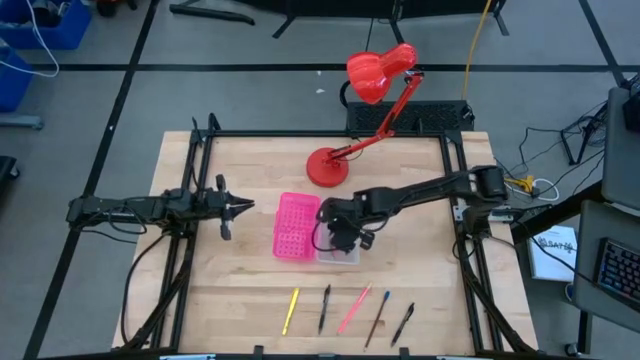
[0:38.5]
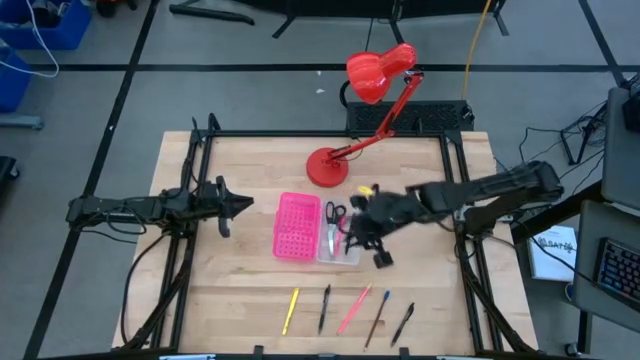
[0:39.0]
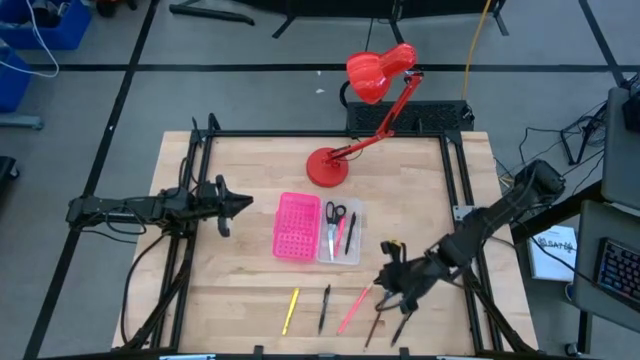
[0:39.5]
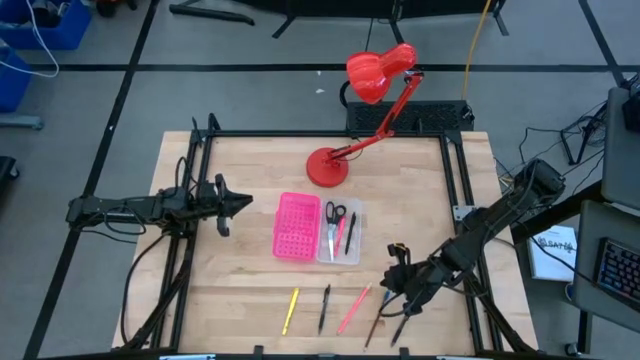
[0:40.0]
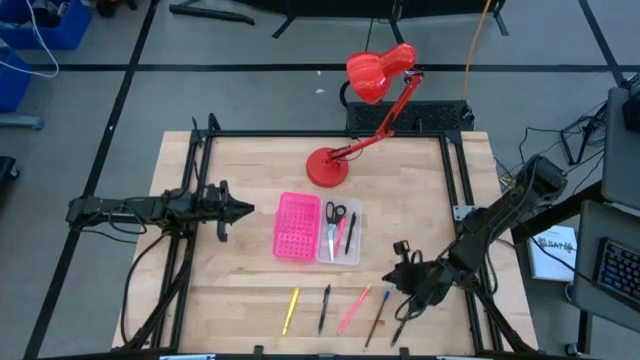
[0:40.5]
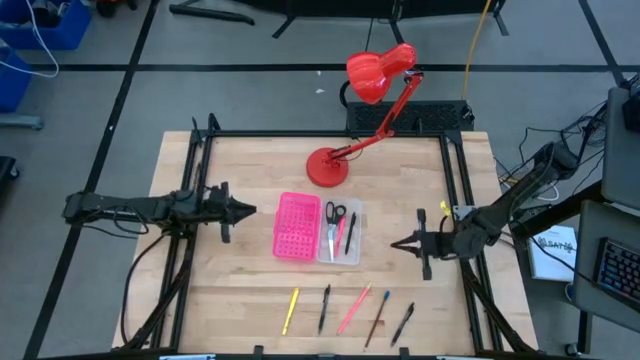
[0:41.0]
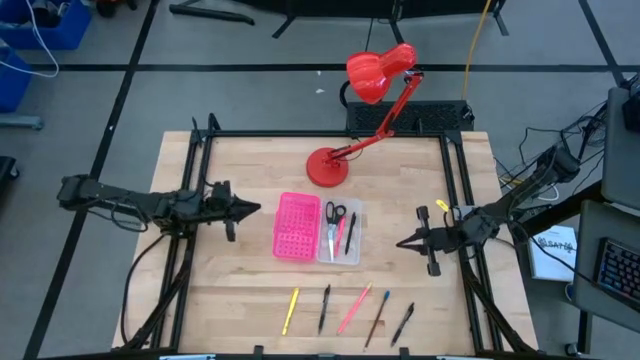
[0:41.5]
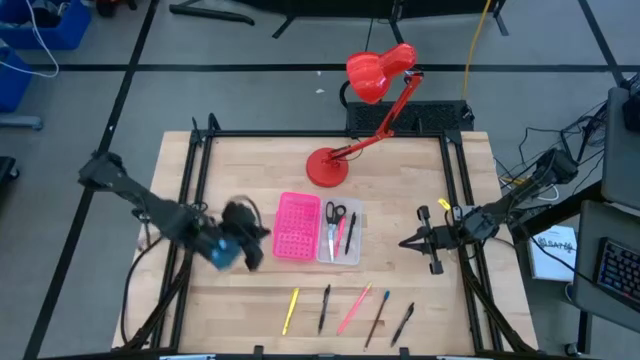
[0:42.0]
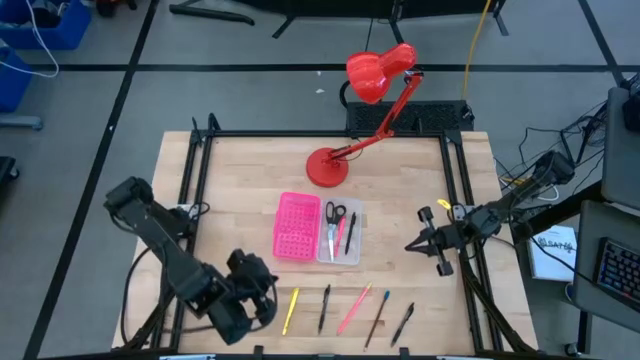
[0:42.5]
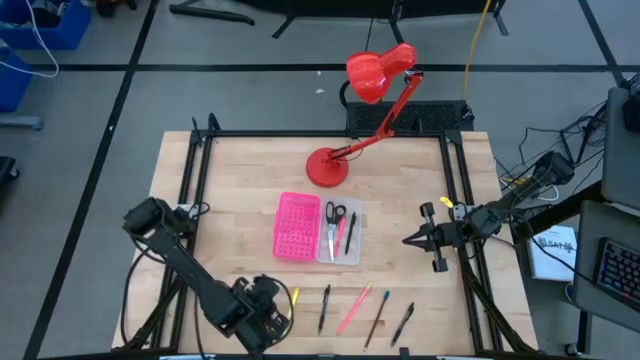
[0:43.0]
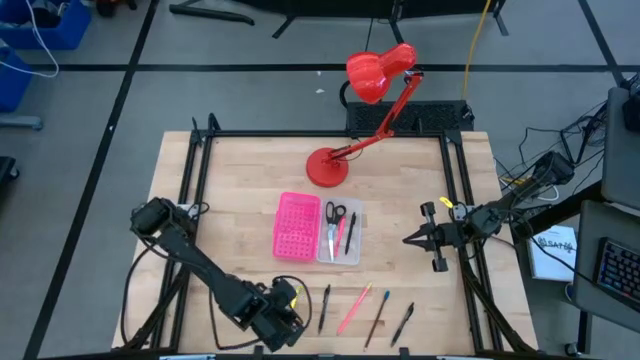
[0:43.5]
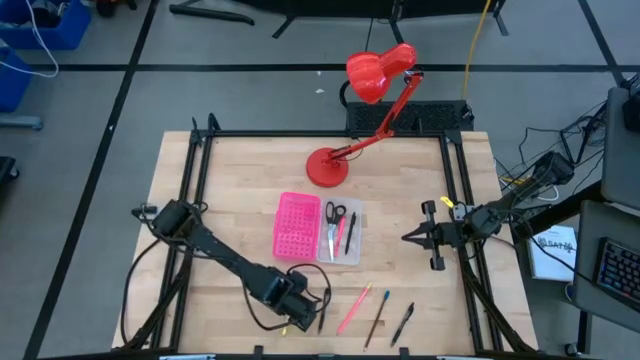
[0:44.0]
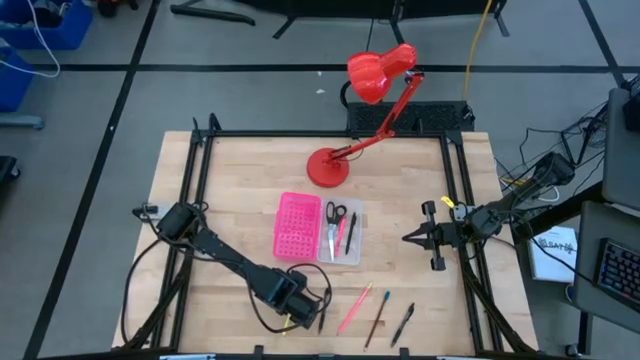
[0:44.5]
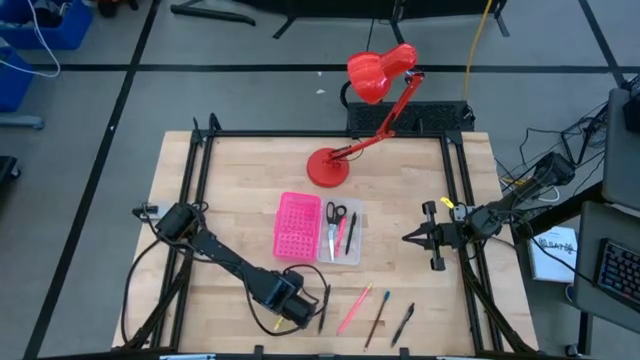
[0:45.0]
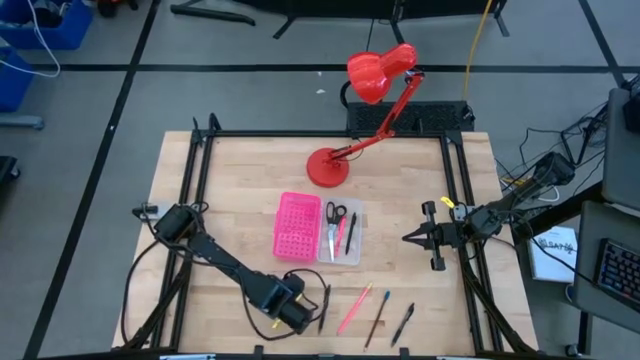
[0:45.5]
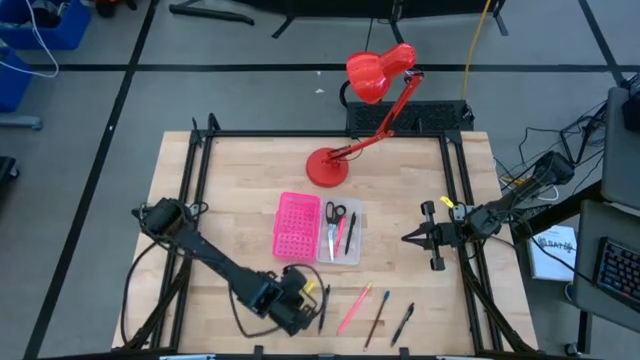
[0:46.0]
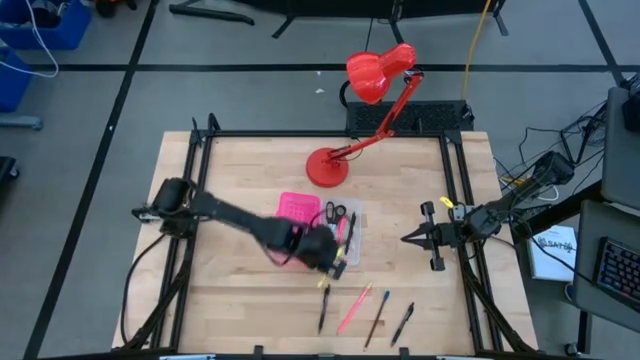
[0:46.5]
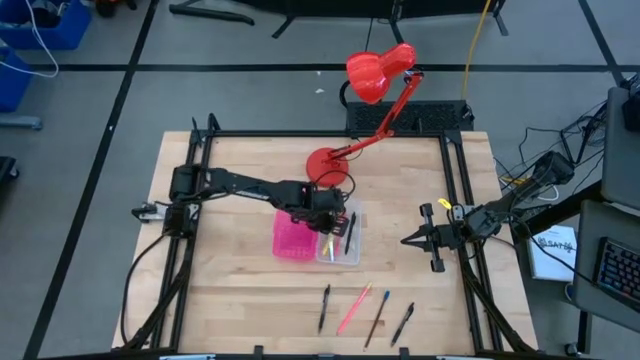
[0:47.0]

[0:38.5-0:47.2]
Task: Pick & place school supplies into a supply box
Put the yellow pen into the pink supply box

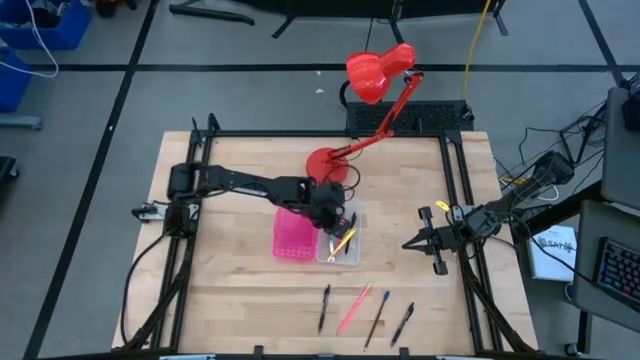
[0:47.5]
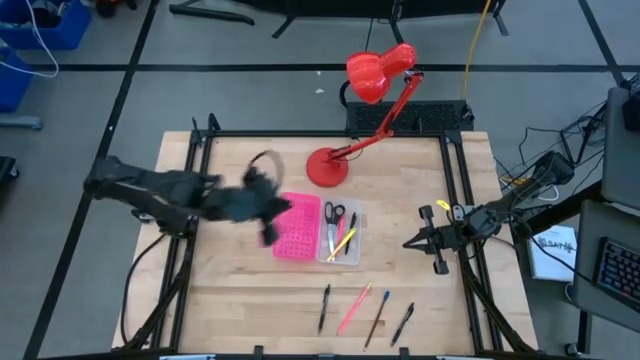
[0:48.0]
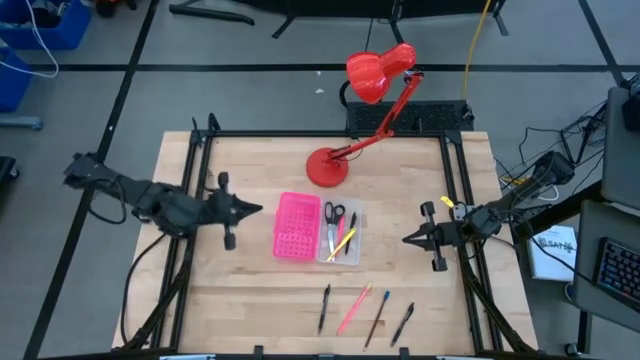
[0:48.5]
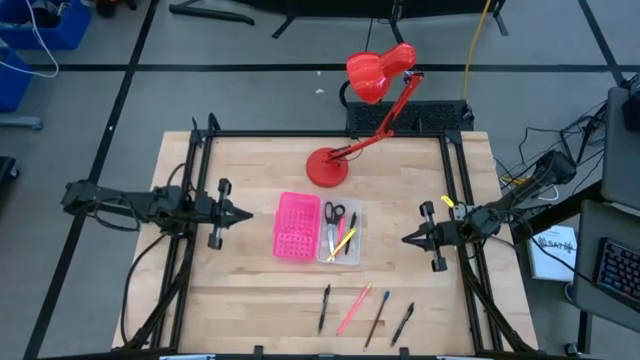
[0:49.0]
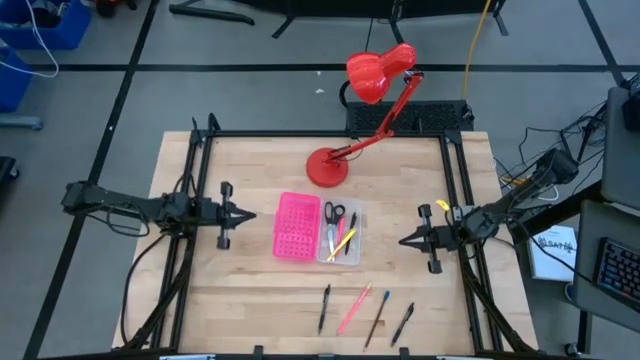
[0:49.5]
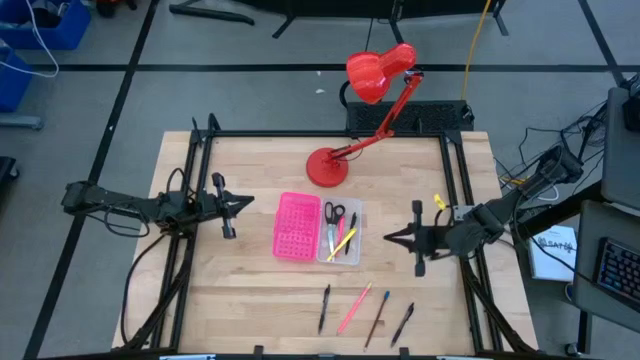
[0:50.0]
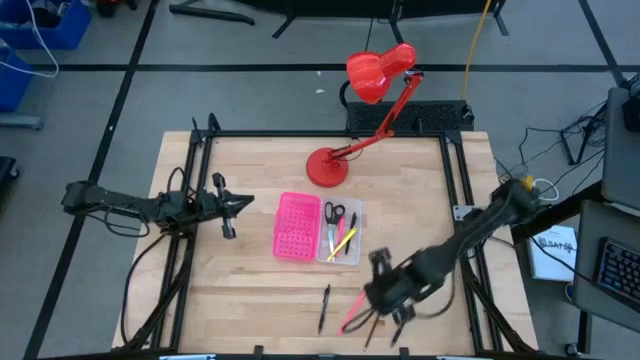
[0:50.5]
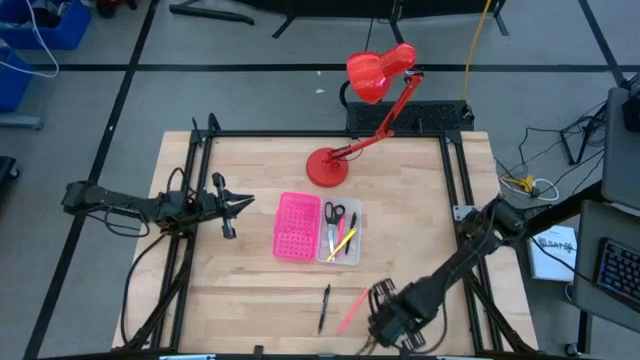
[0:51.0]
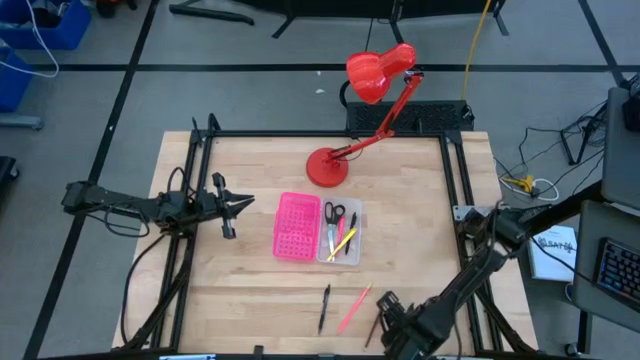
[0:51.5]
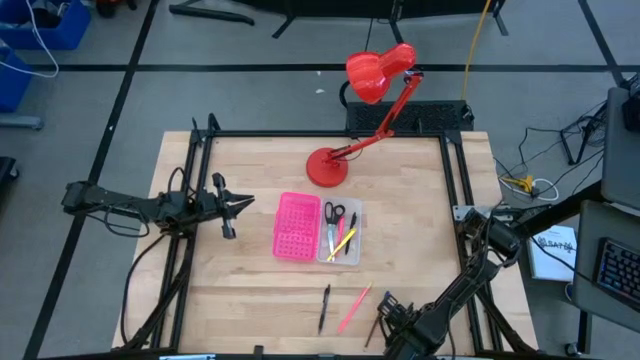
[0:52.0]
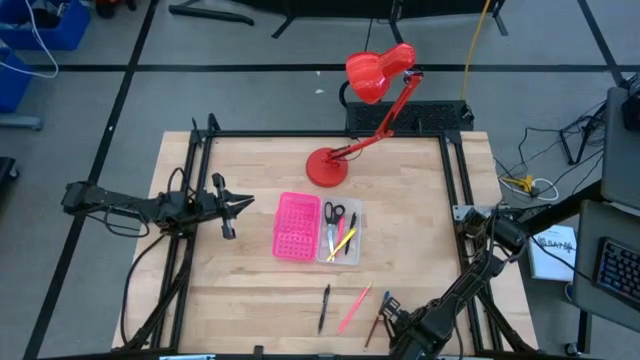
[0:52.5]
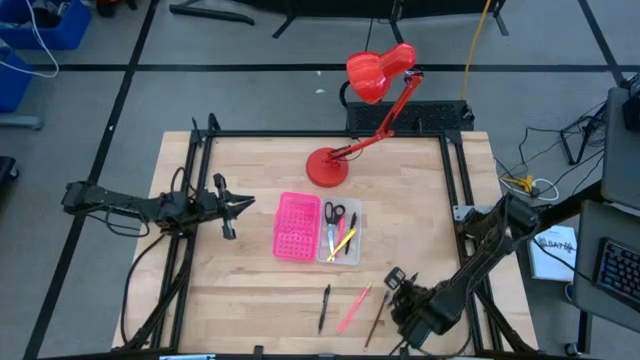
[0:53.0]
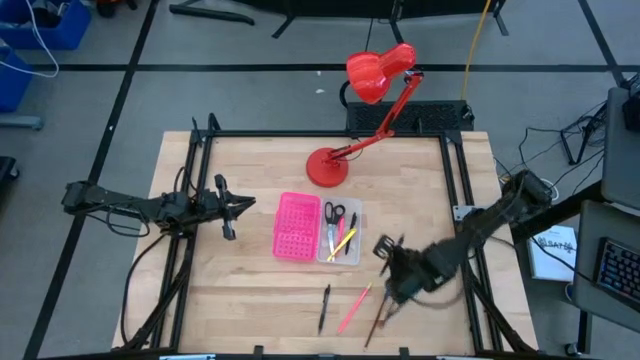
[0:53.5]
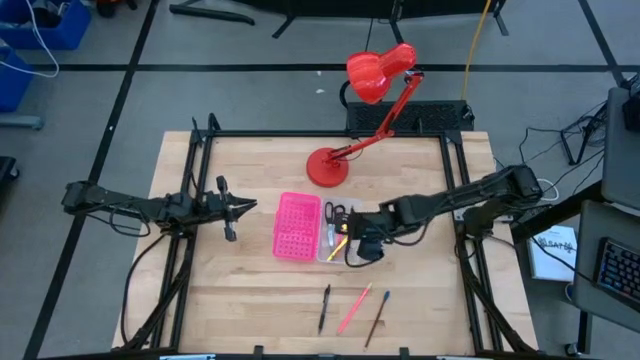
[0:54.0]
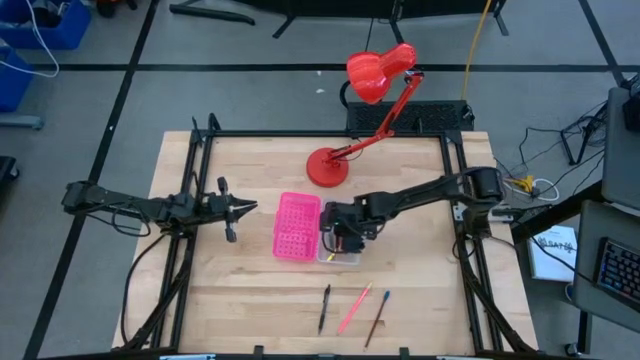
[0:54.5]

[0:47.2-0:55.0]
Put the black pen into the pink supply box

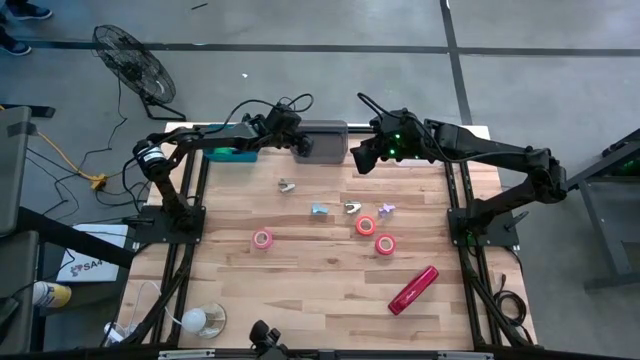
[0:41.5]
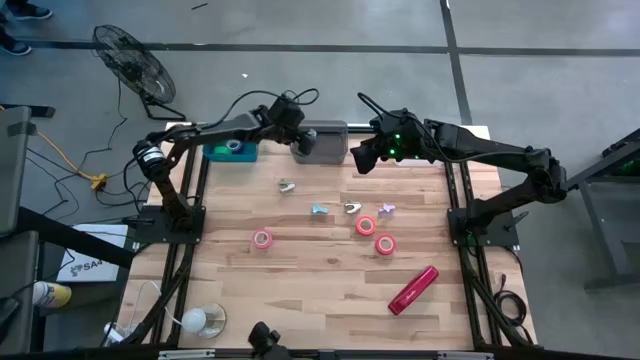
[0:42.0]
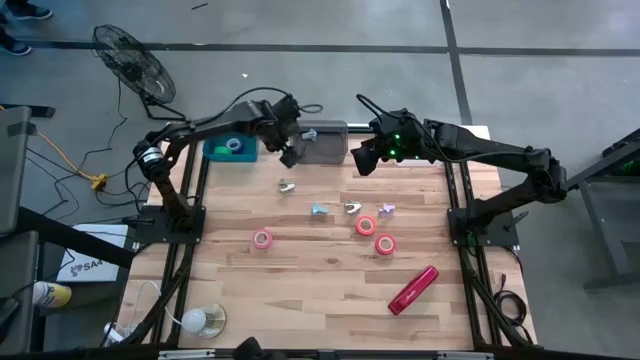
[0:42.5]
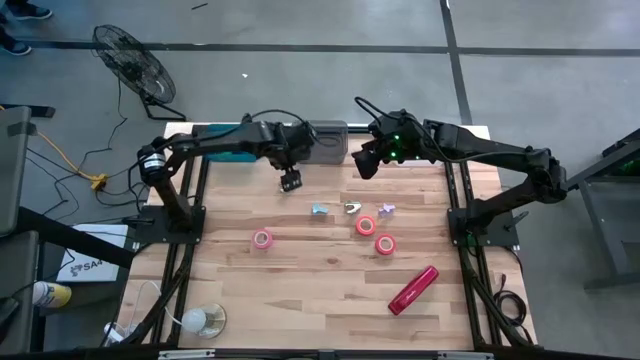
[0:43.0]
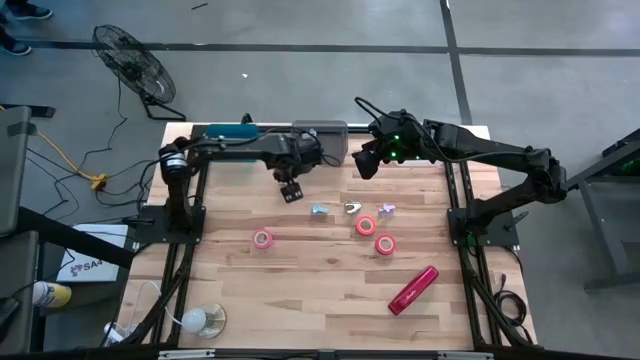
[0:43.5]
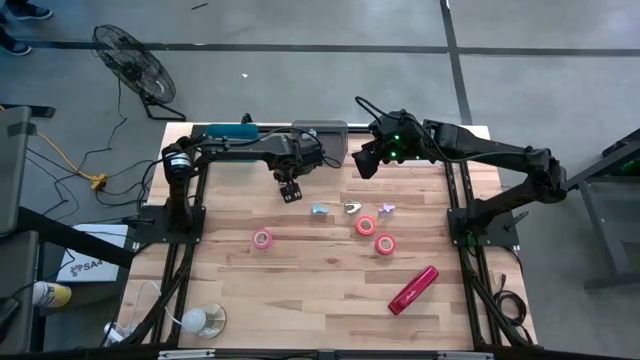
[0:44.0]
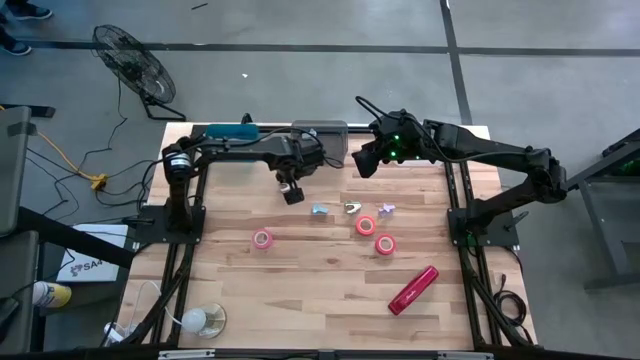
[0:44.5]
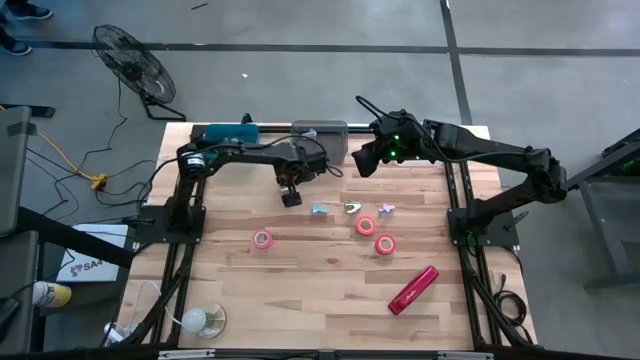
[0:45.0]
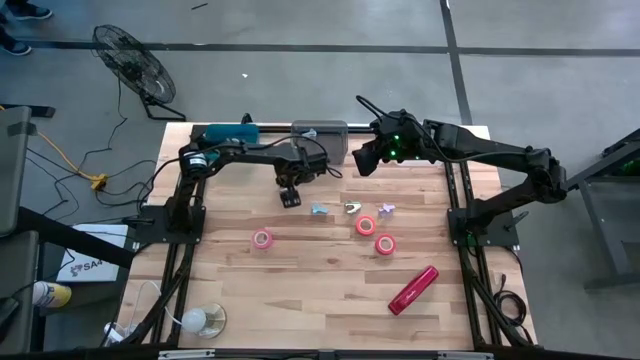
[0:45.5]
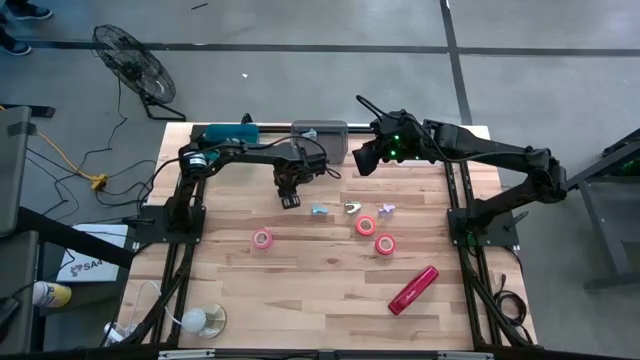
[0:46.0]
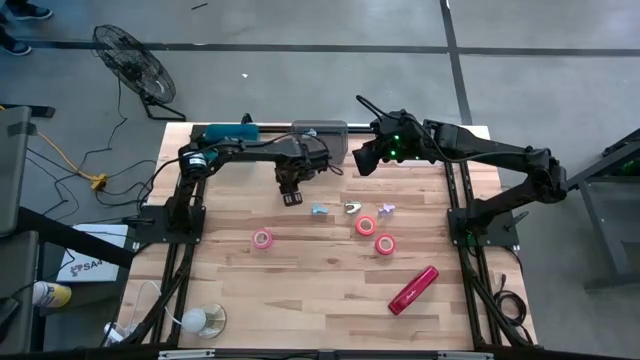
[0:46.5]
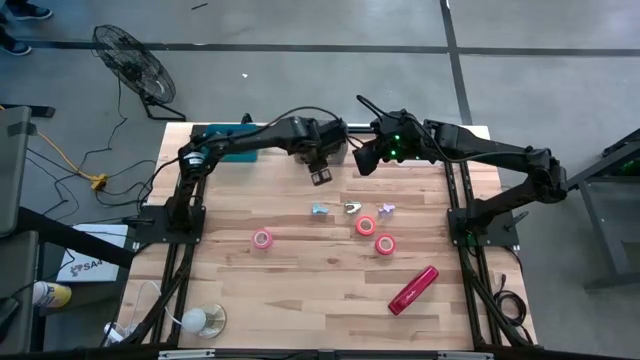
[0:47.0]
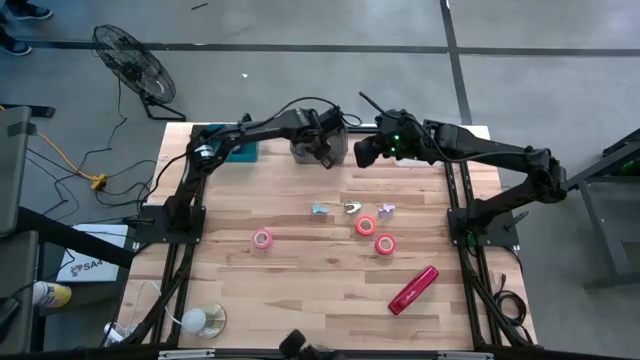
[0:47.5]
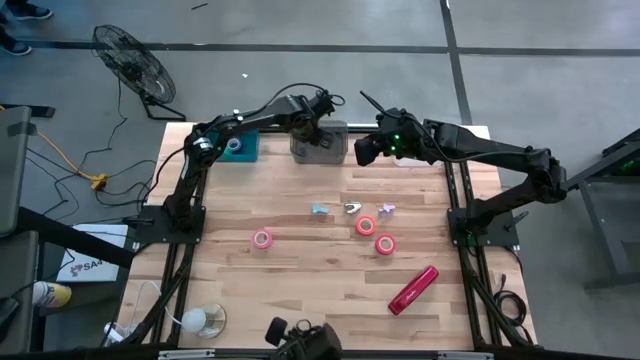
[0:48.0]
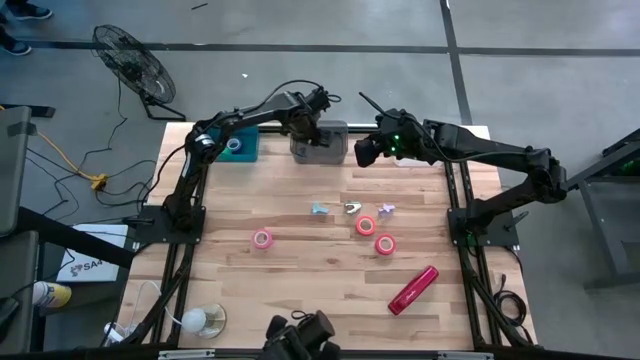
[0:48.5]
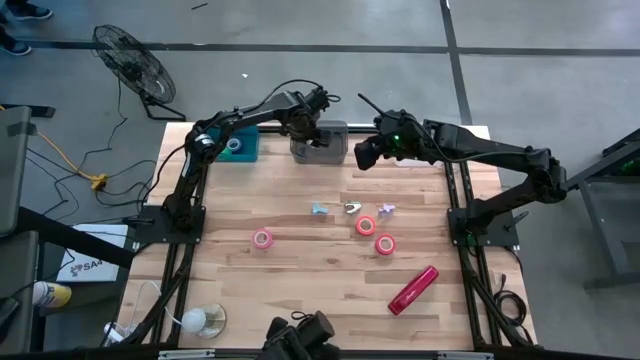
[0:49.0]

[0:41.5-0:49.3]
Task: Pick and place Stapler, Stapler remover, tape
Put the left white staple remover into the black bin
